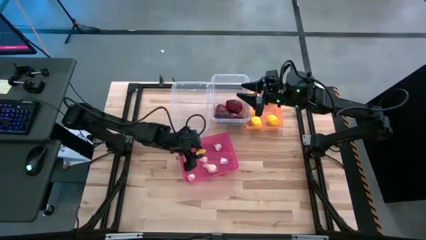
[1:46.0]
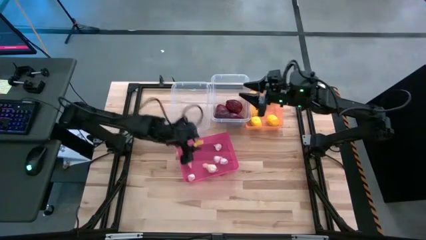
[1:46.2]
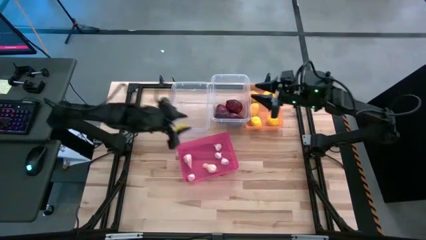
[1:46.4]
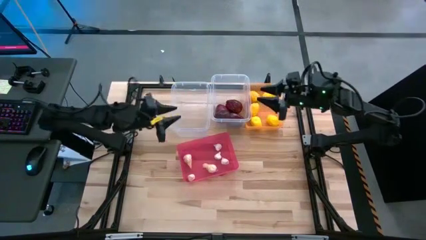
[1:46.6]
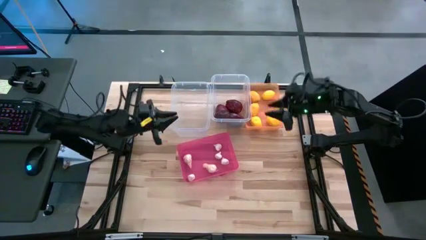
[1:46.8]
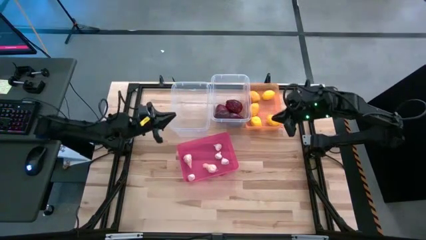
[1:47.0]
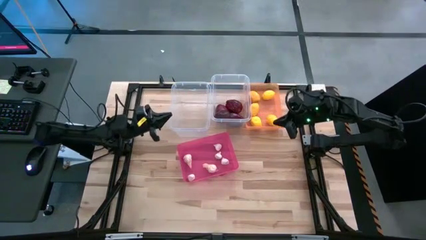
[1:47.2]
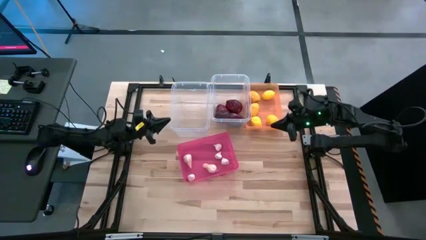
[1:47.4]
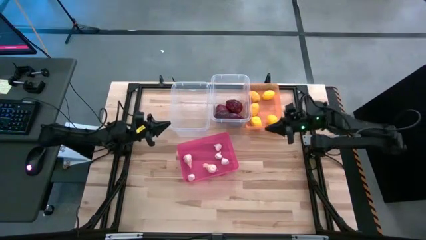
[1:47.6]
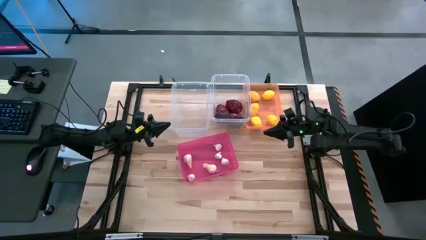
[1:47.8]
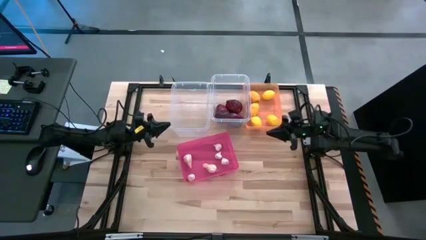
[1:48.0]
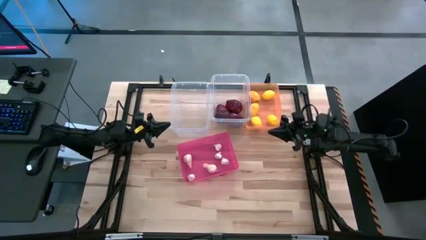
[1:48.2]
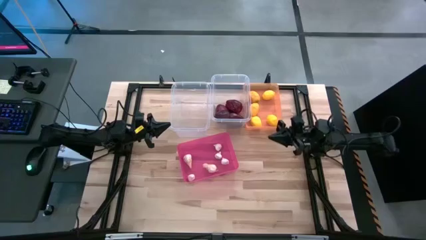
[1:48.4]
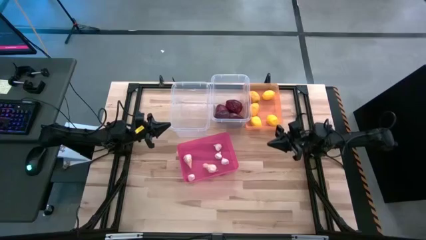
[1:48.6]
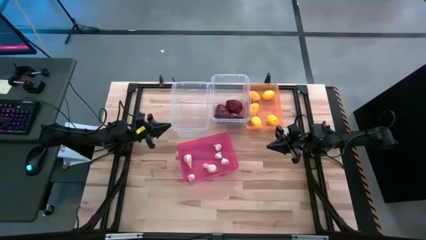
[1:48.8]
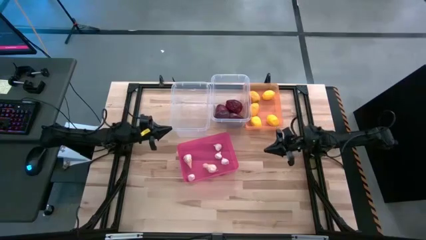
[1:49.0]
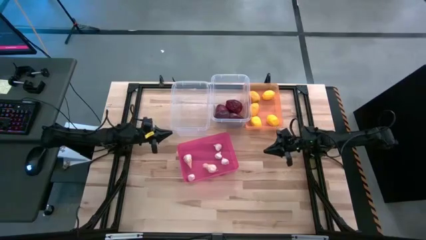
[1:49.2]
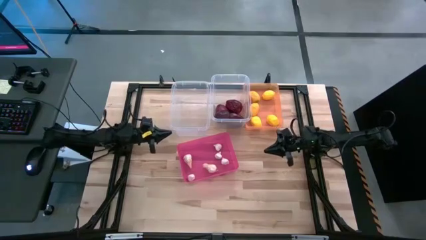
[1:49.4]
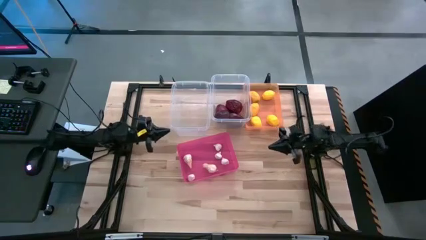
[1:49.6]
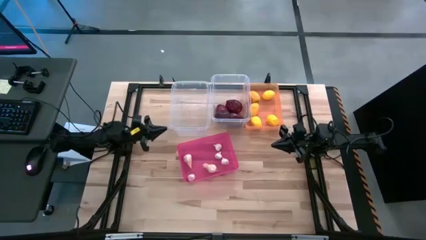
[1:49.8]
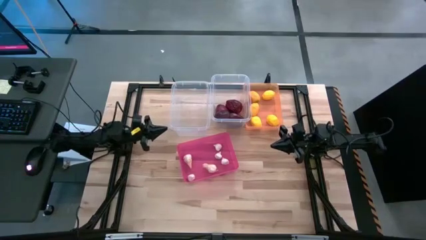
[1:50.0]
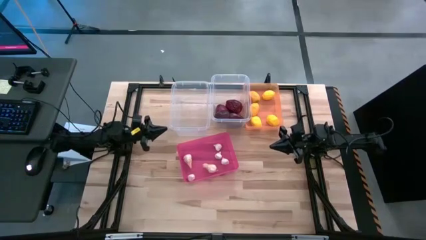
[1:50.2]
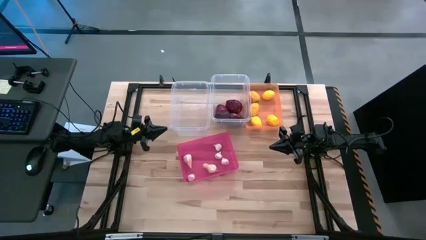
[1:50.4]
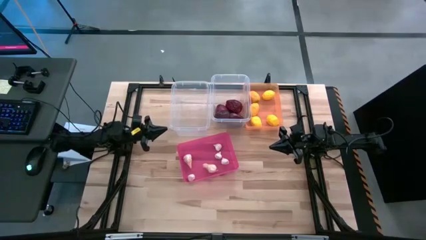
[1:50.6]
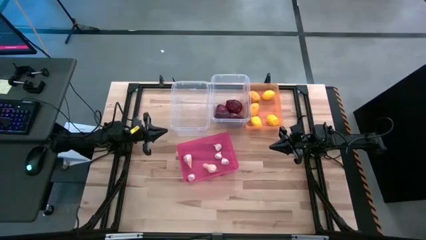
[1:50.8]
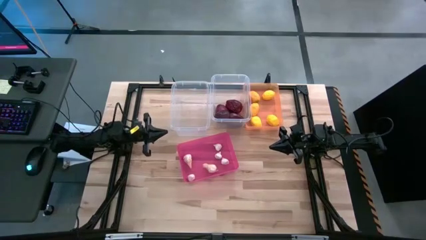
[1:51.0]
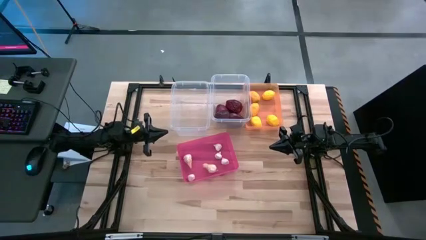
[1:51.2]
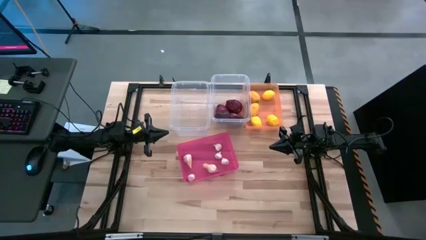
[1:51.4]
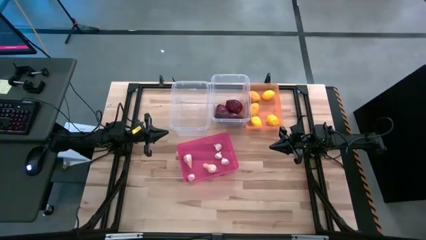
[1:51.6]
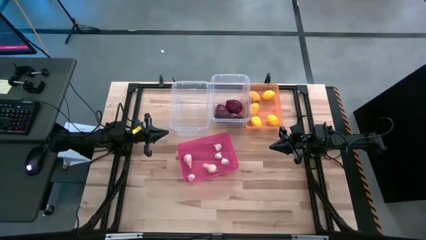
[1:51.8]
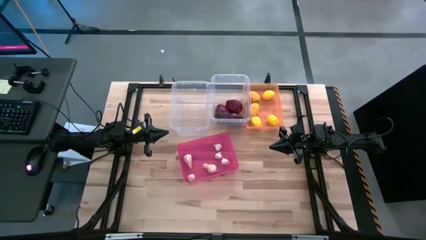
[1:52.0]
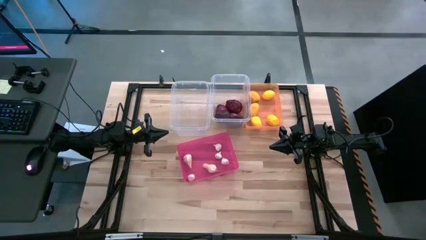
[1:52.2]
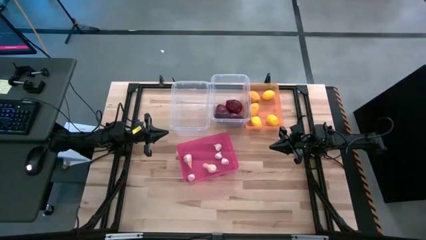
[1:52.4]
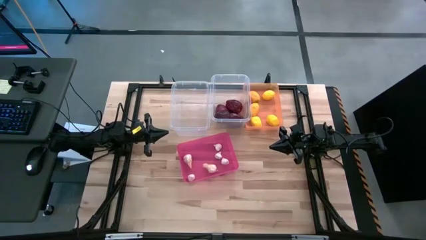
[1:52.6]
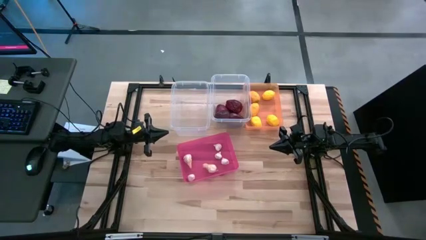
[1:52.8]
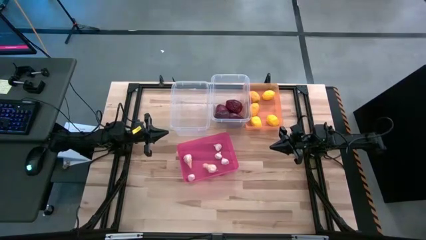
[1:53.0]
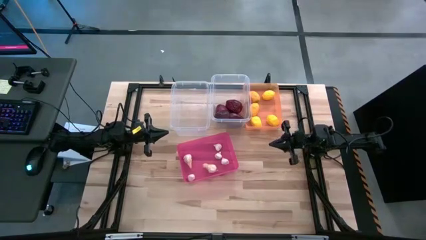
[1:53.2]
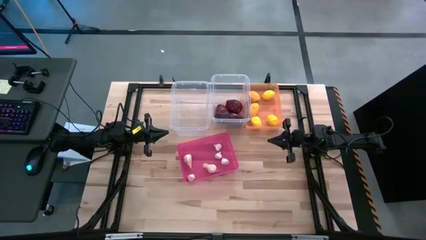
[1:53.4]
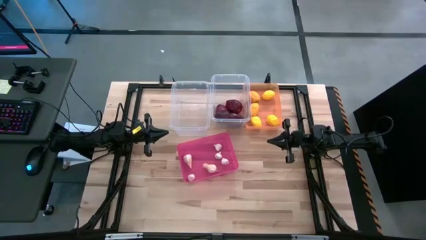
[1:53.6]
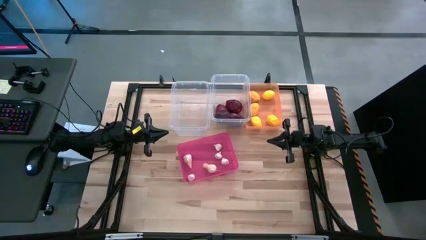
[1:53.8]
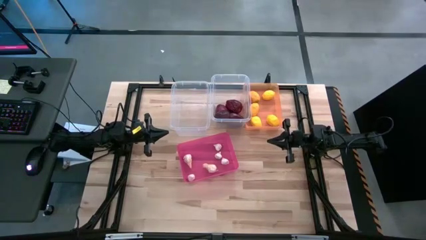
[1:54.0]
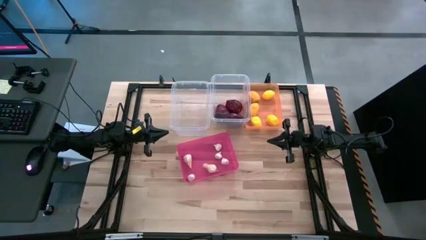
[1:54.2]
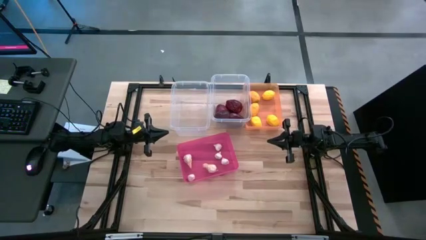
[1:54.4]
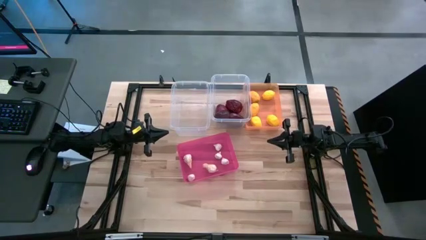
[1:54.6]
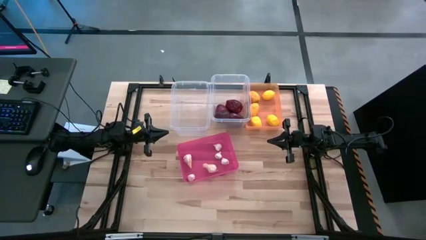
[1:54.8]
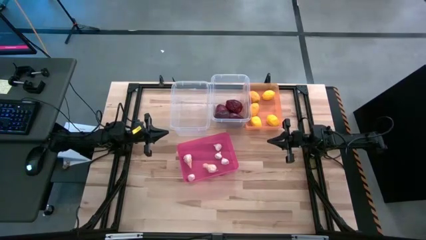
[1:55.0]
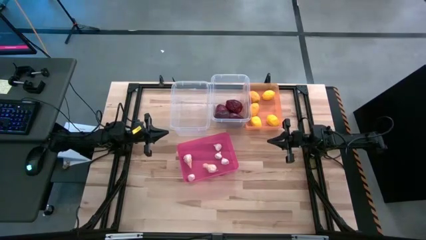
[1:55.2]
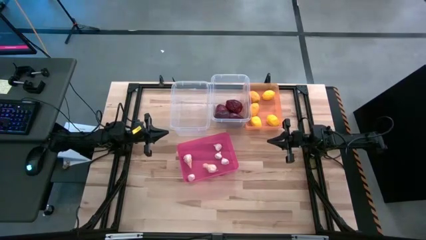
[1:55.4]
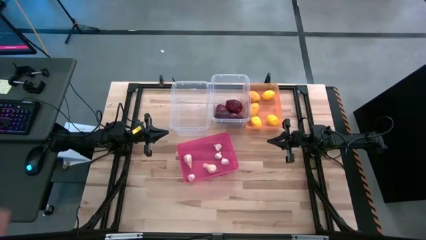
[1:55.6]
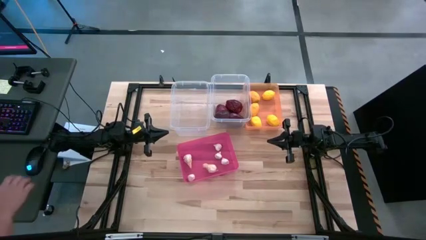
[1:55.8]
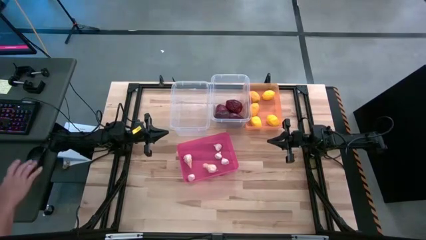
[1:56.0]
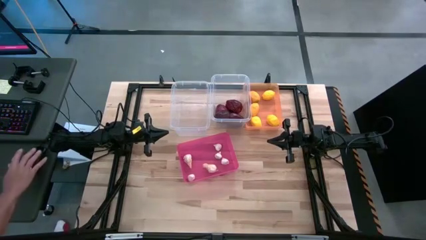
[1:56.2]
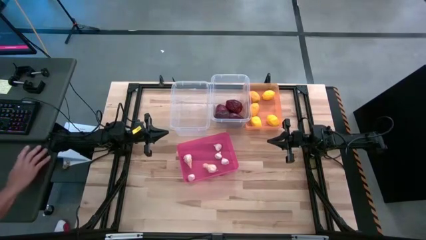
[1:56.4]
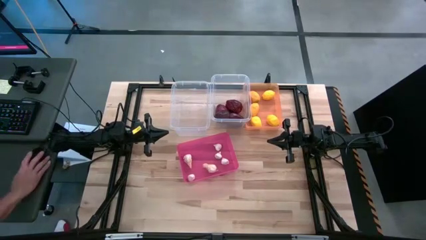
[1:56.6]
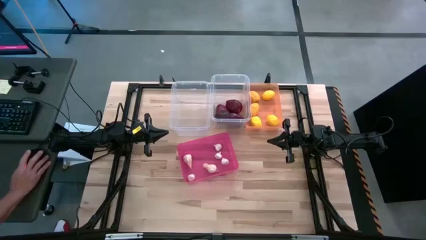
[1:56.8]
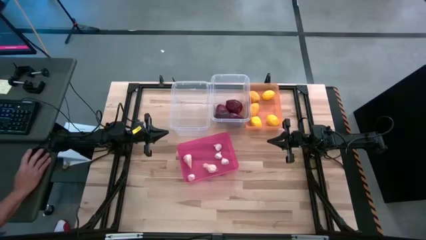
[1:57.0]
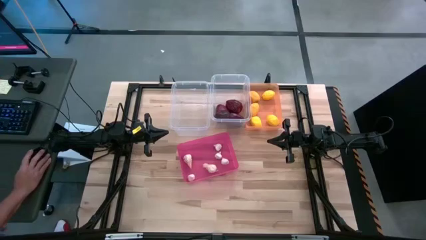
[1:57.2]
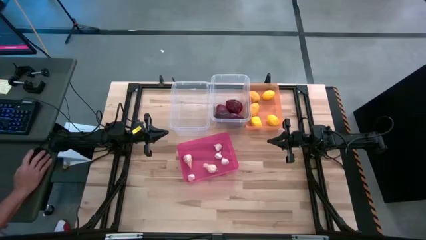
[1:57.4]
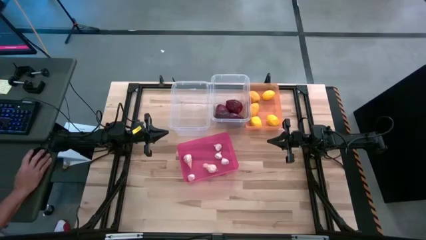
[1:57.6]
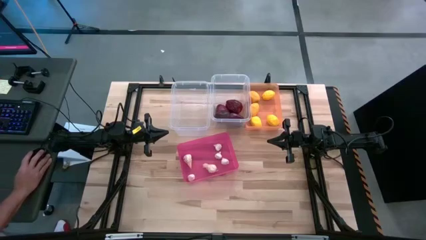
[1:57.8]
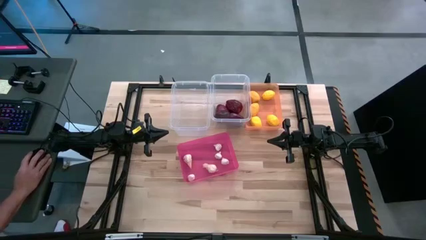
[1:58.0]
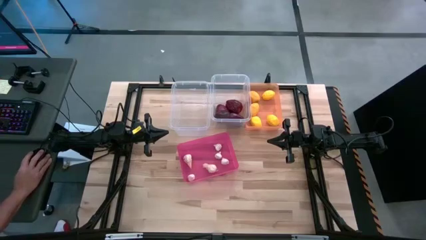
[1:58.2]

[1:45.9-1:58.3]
Task: Sort produce into baskets
Return to Home Position
